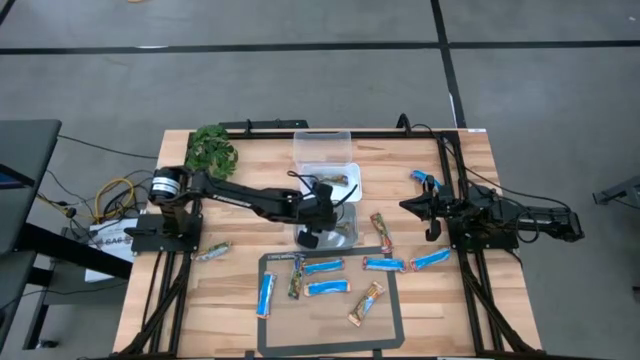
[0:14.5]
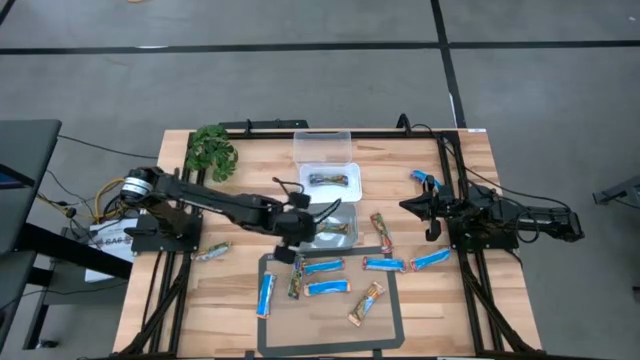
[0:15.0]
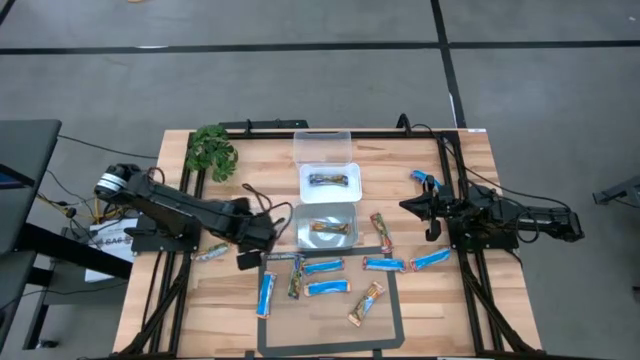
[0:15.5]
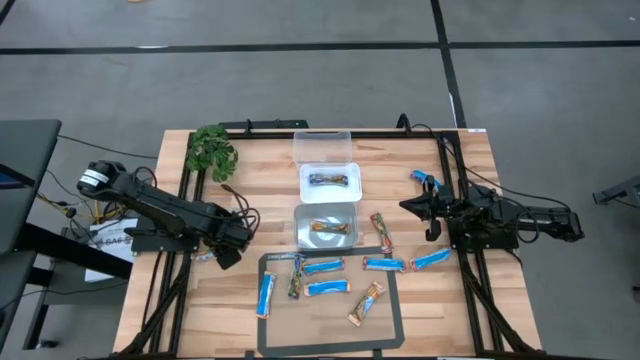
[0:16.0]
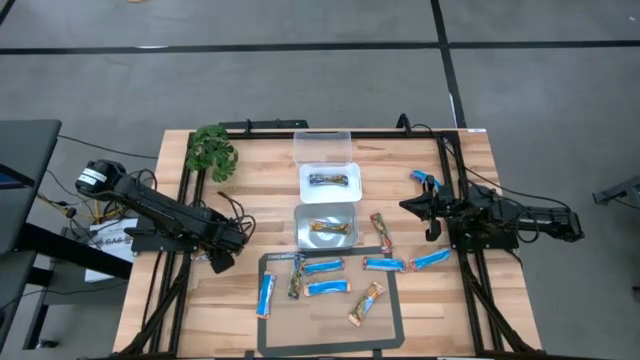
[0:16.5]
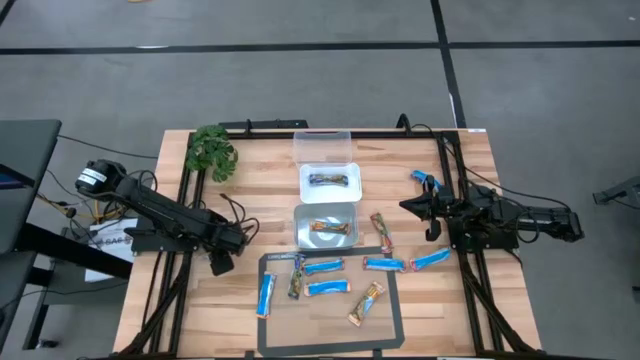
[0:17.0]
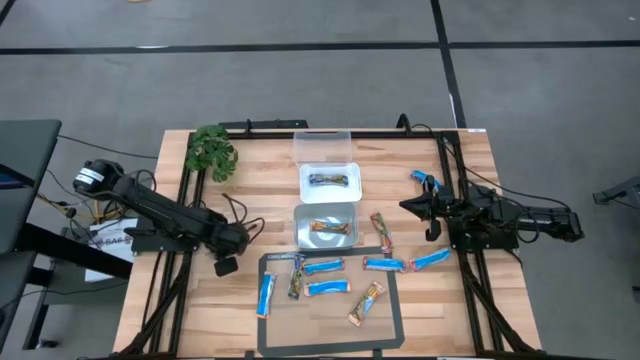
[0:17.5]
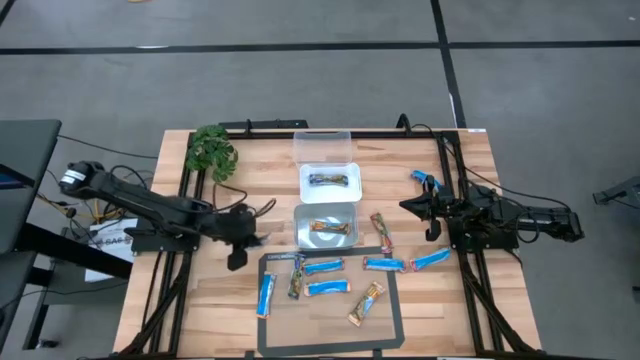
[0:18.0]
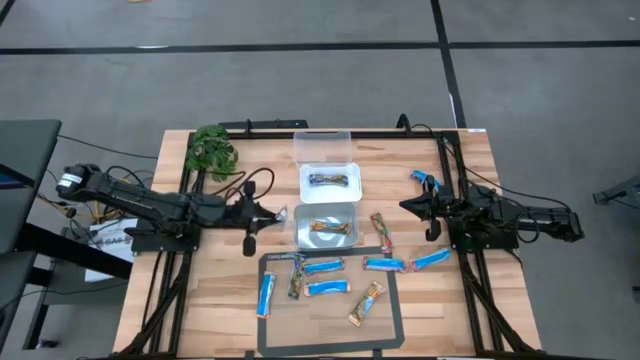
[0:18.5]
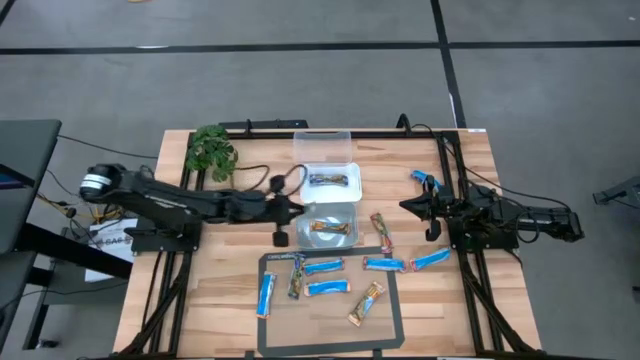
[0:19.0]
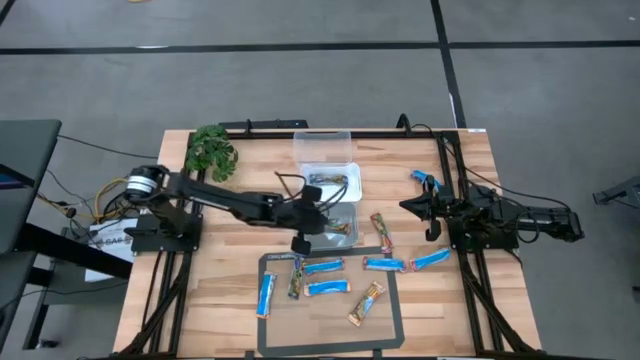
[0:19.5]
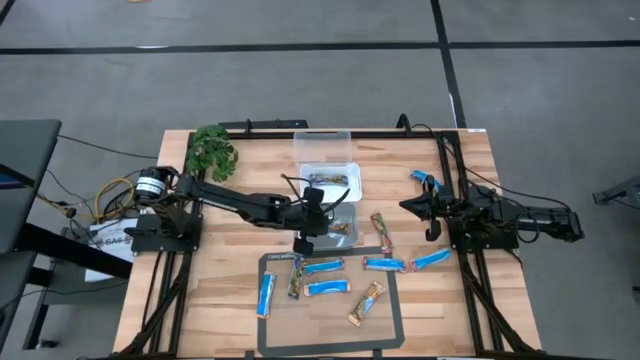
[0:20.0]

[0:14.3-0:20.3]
Task: Pick and place Granola Bars by type
Put the yellow granola bar into the gray bin

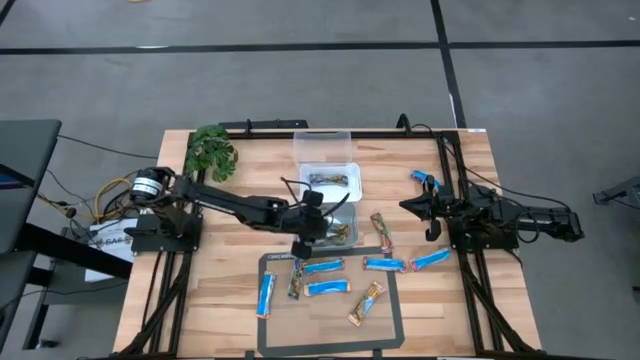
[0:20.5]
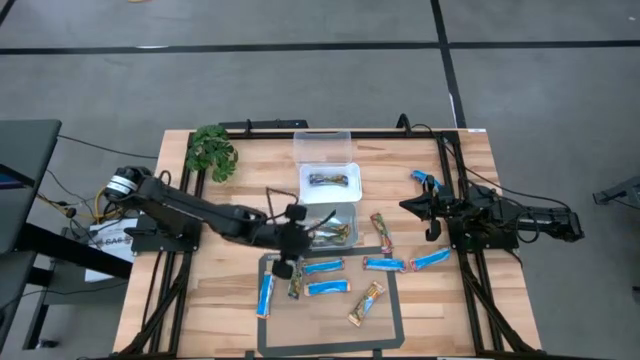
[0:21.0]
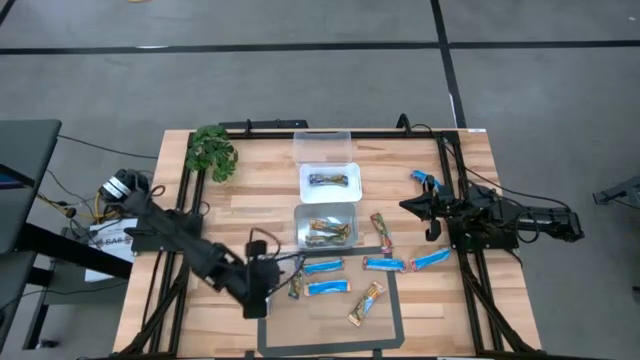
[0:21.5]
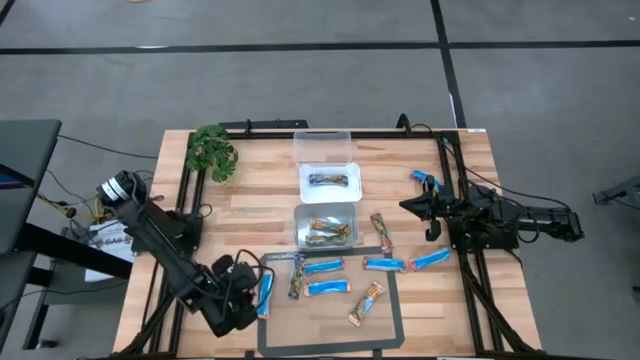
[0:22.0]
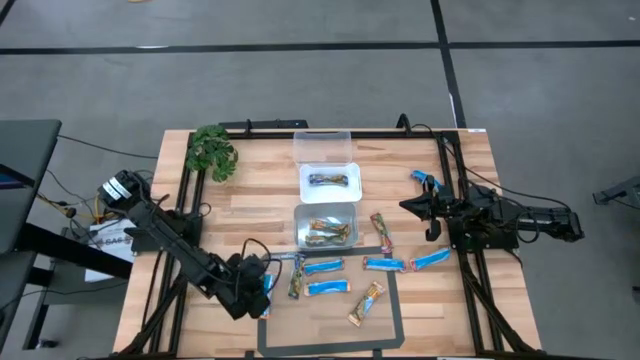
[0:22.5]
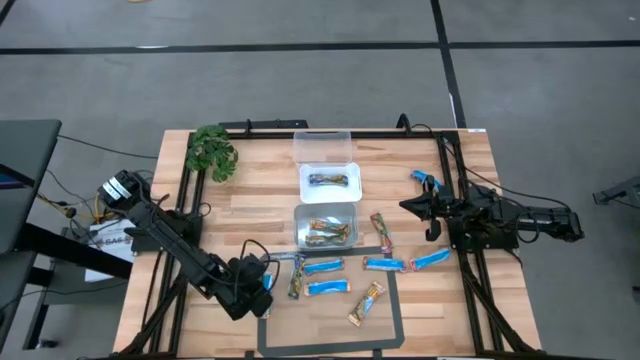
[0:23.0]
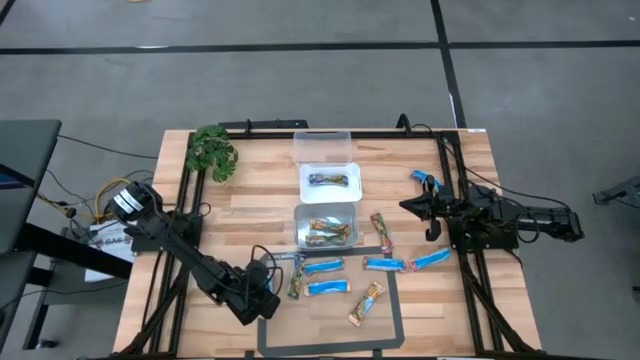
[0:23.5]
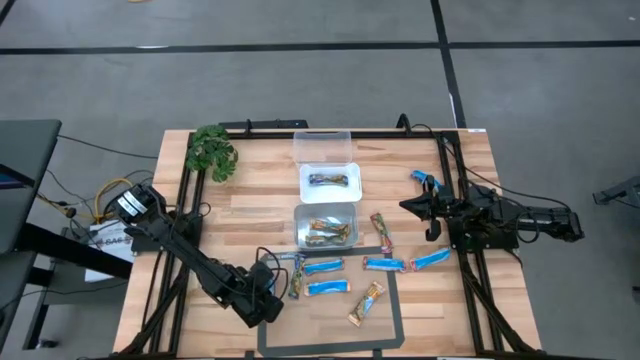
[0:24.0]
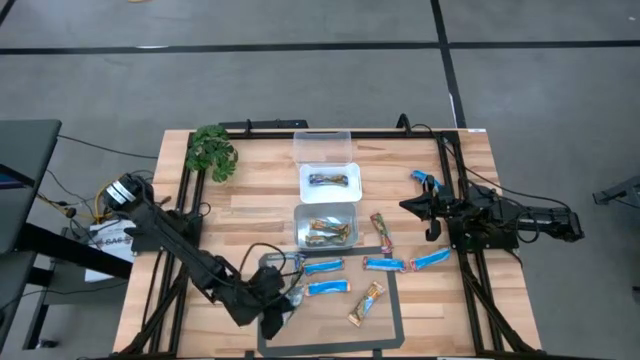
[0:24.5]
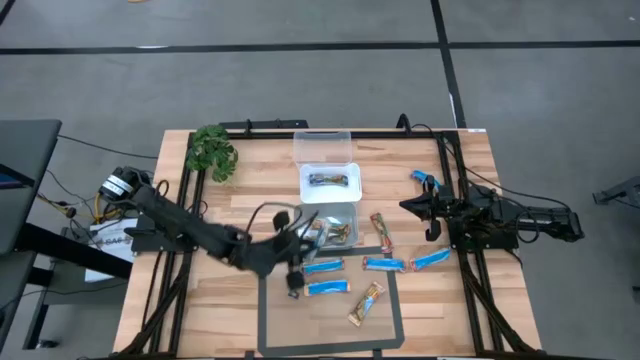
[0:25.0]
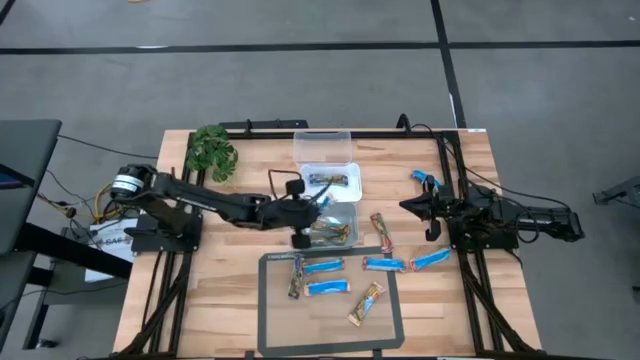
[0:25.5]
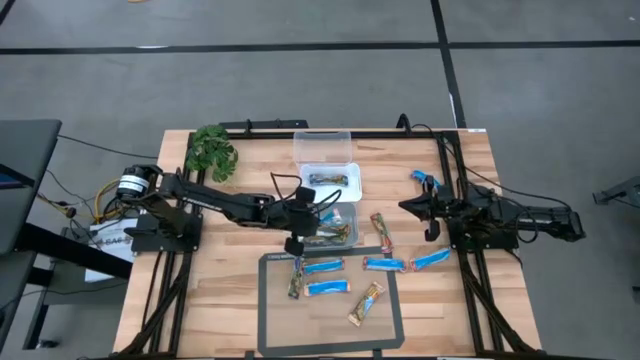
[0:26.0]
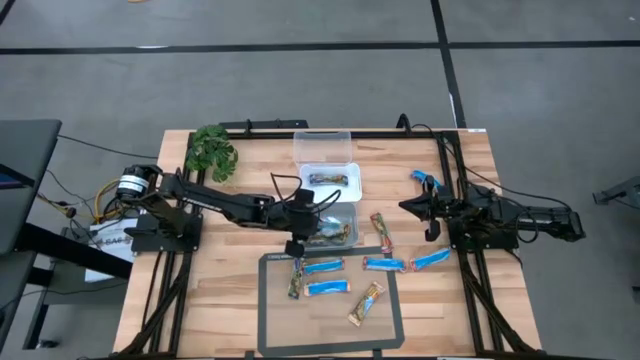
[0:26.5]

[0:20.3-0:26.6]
Put the yellow granola bar into the gray bin

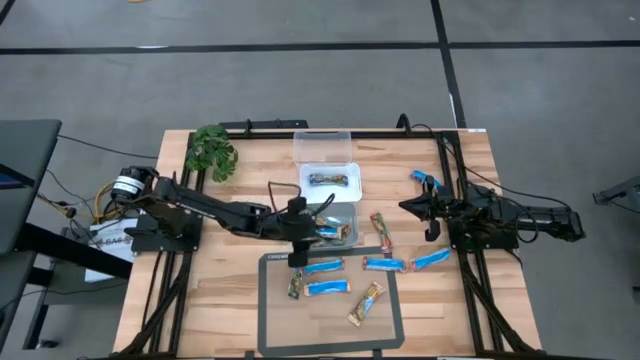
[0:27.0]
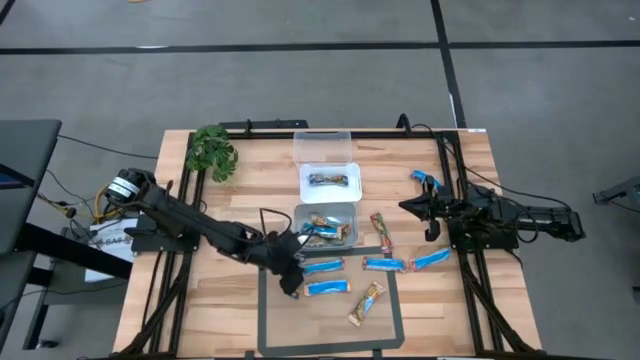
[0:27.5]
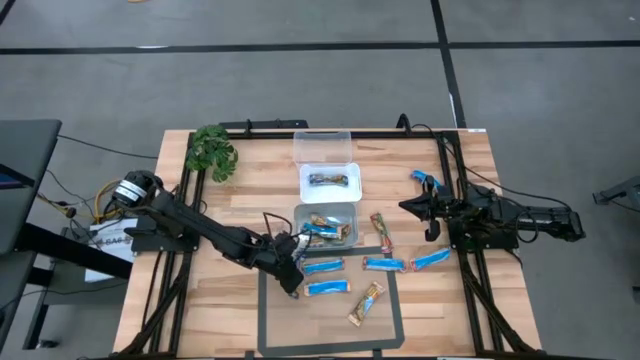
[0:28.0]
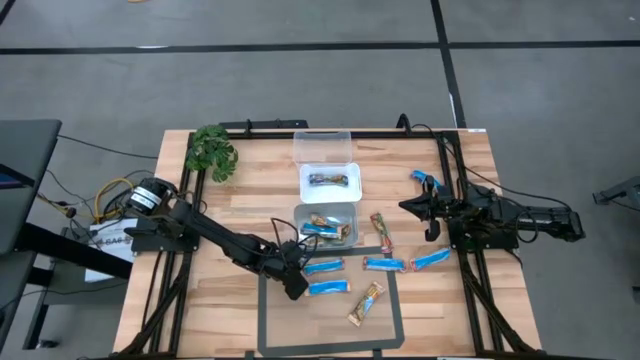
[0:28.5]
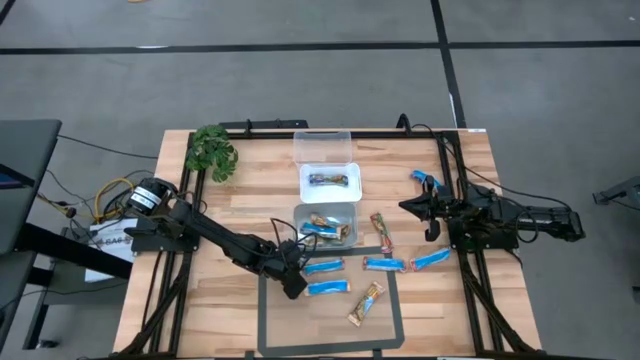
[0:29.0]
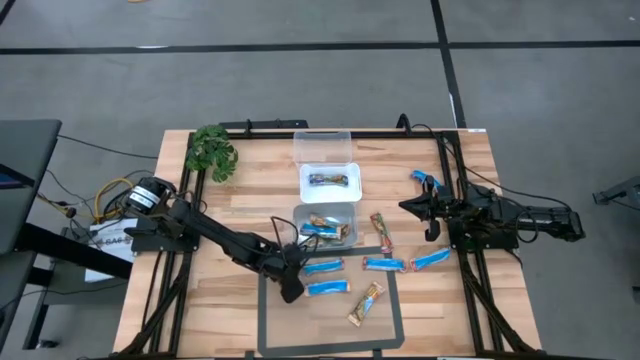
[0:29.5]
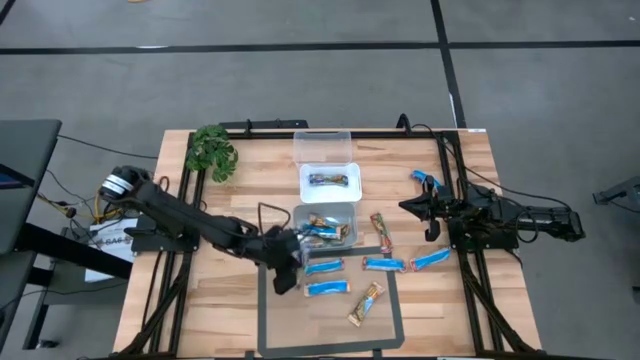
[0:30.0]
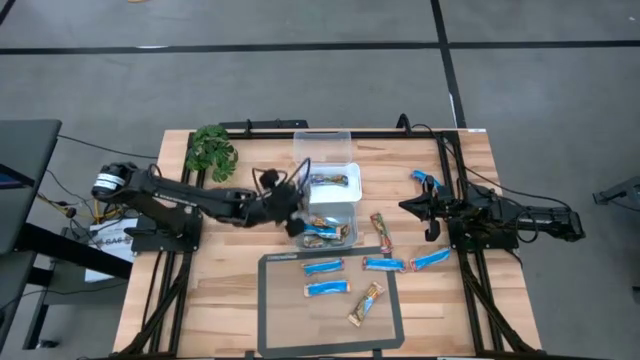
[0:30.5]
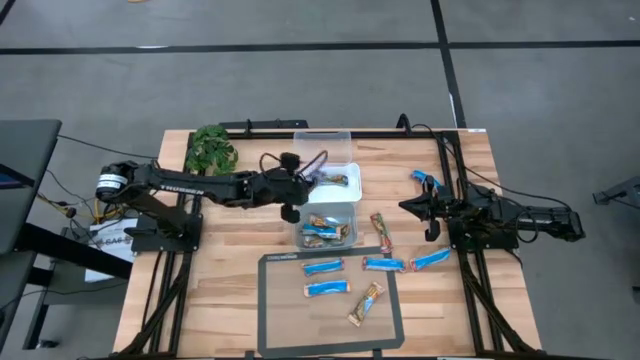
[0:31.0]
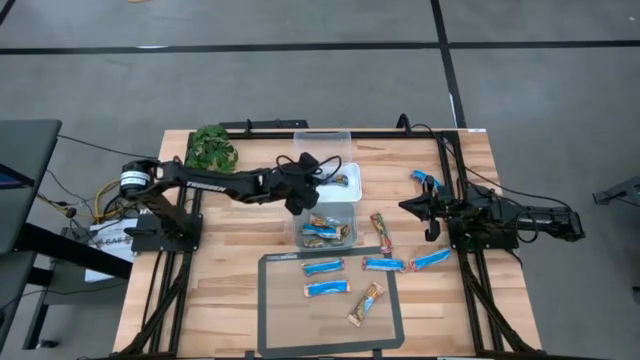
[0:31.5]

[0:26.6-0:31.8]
Put the blue granola bar into the white bin

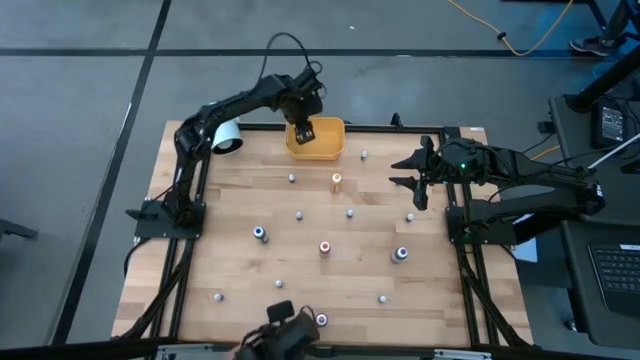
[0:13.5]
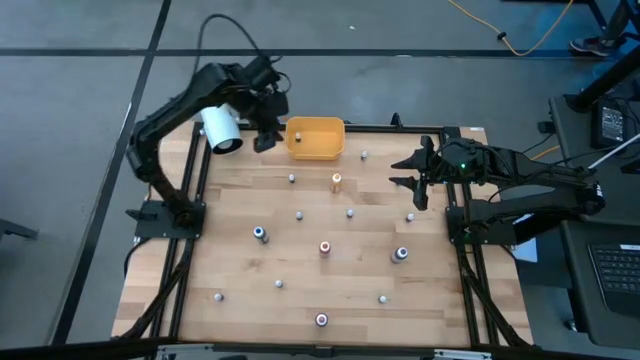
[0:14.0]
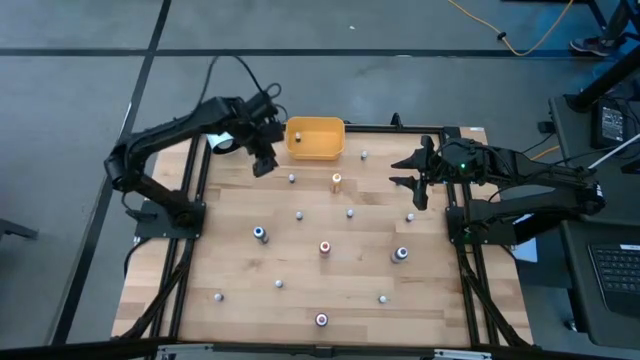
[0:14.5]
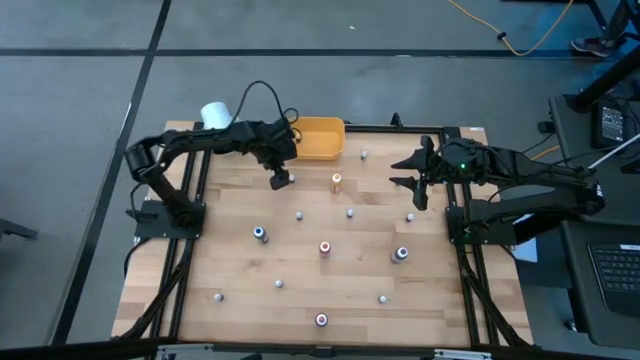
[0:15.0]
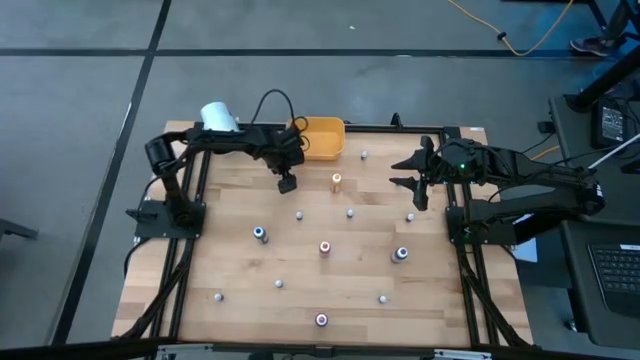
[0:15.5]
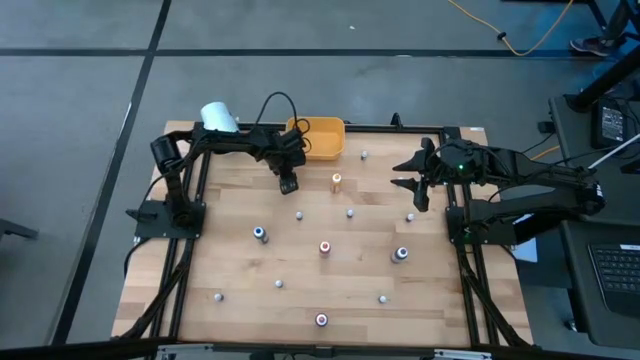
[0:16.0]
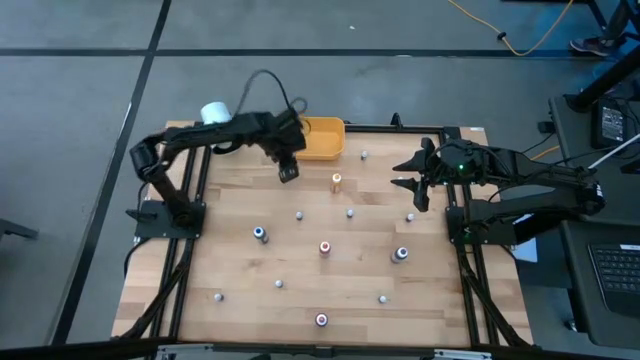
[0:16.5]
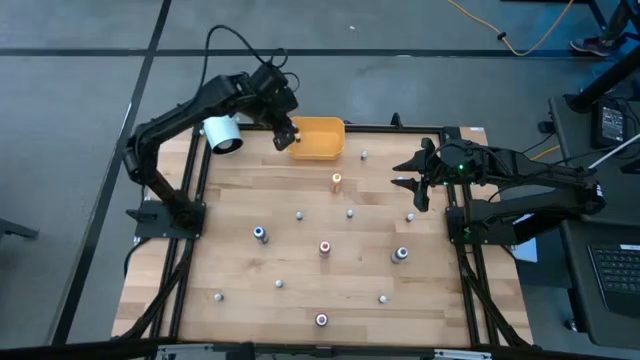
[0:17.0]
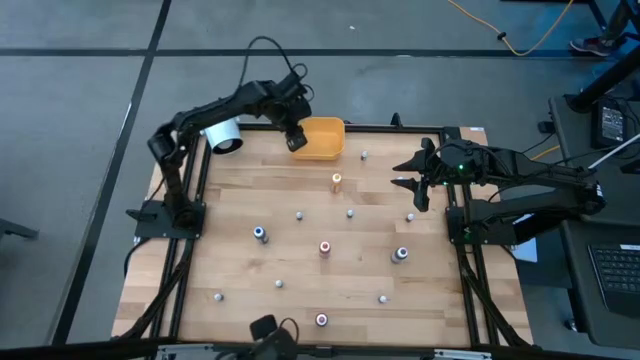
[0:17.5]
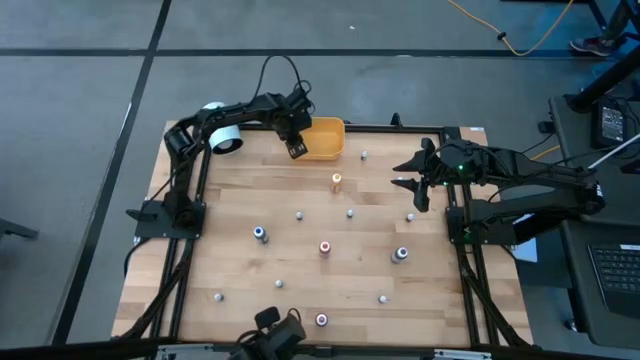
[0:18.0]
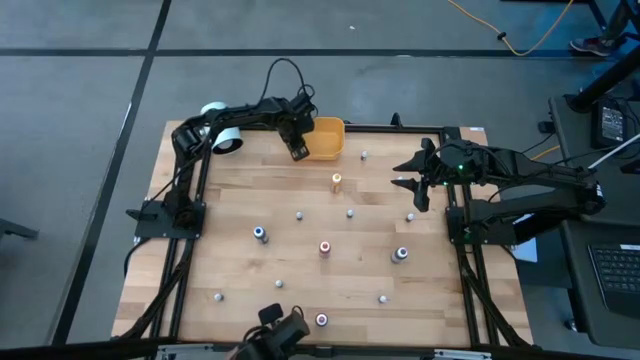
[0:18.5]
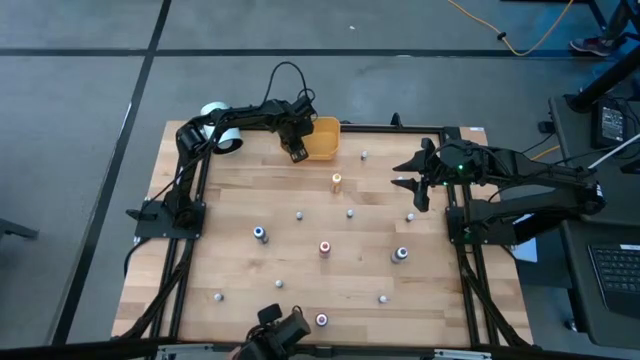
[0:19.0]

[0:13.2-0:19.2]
Task: Pick & Place food coloring
Put the green food coloring bottle into the yellow bin
